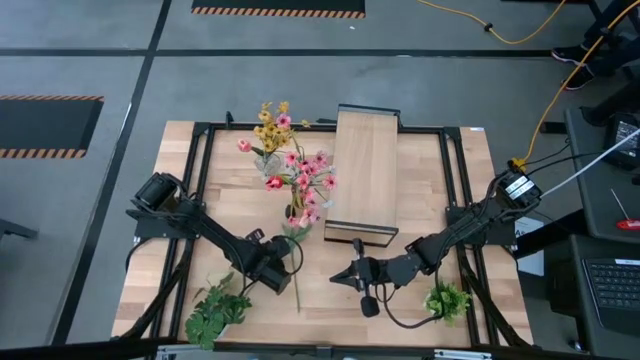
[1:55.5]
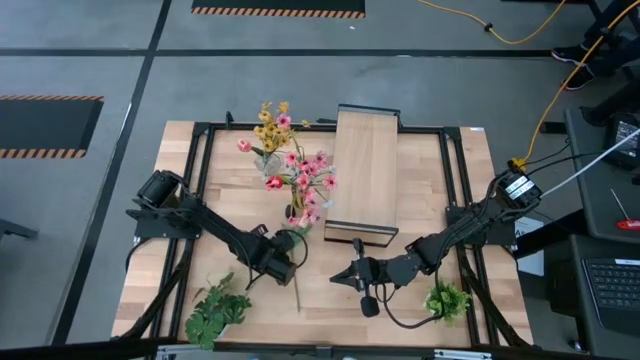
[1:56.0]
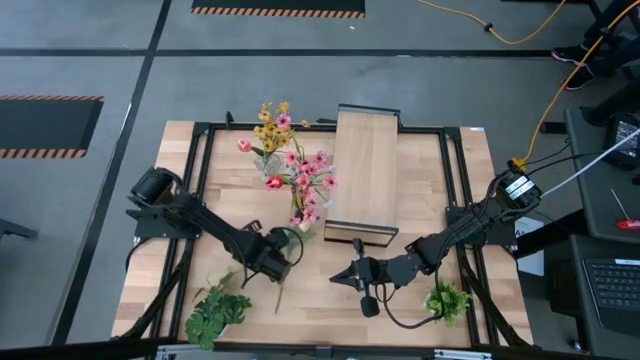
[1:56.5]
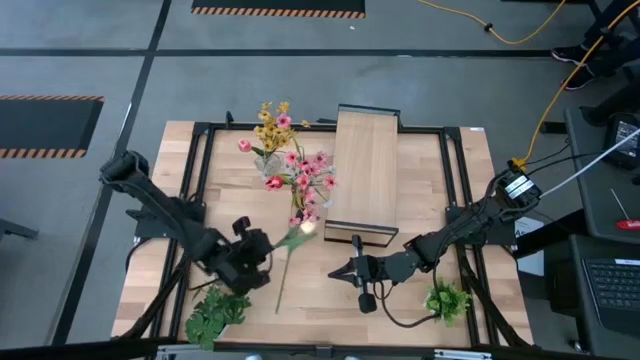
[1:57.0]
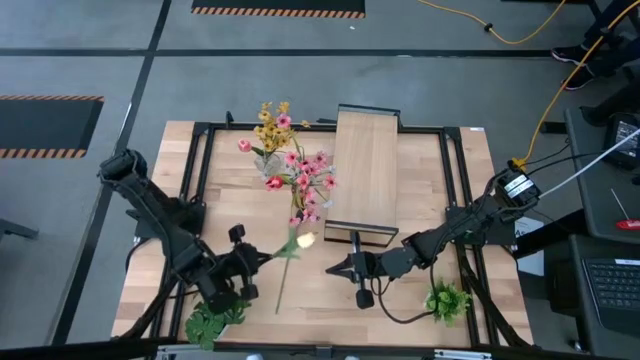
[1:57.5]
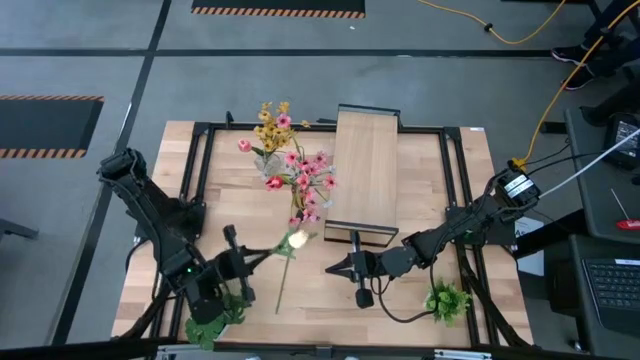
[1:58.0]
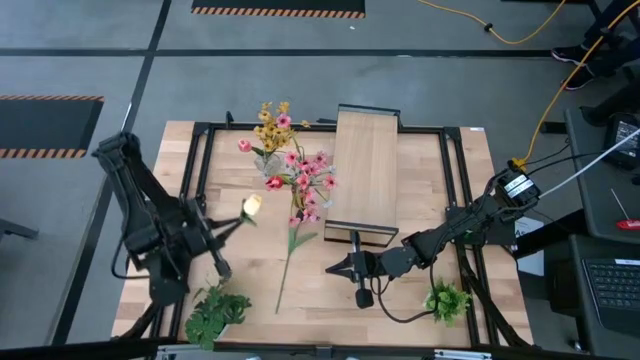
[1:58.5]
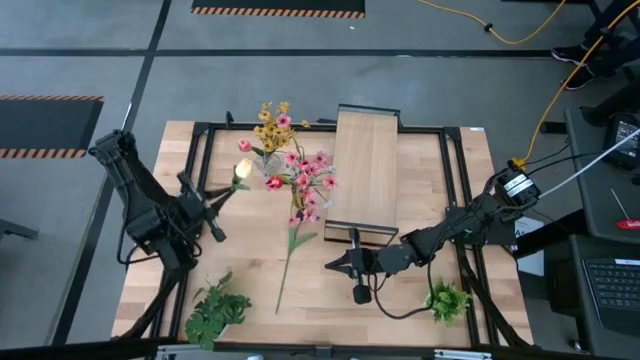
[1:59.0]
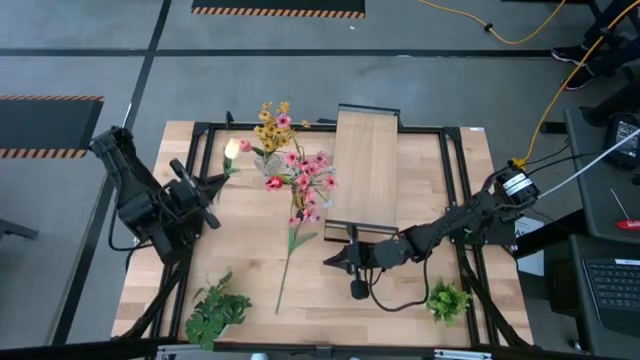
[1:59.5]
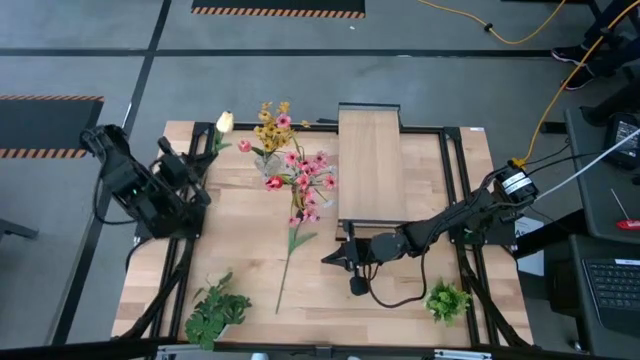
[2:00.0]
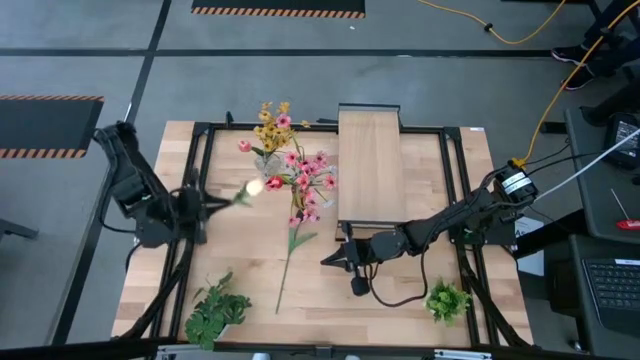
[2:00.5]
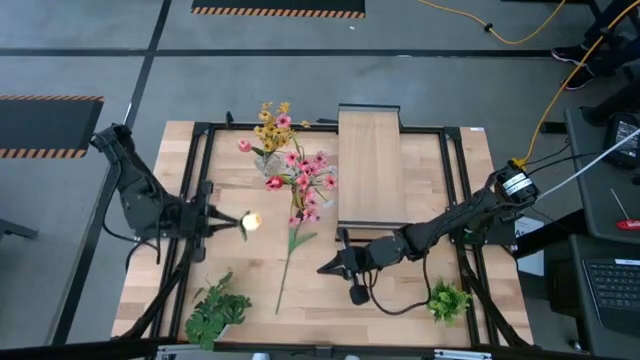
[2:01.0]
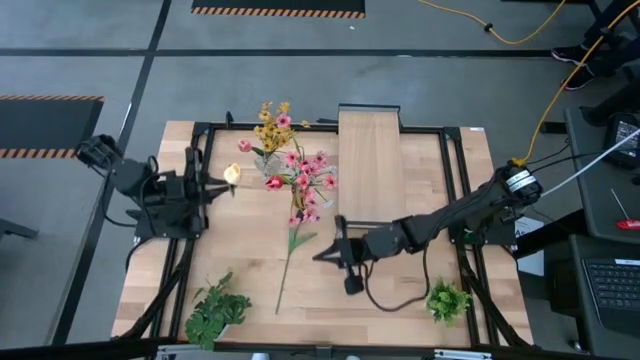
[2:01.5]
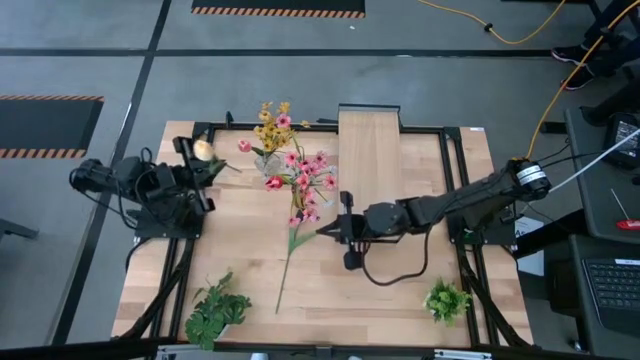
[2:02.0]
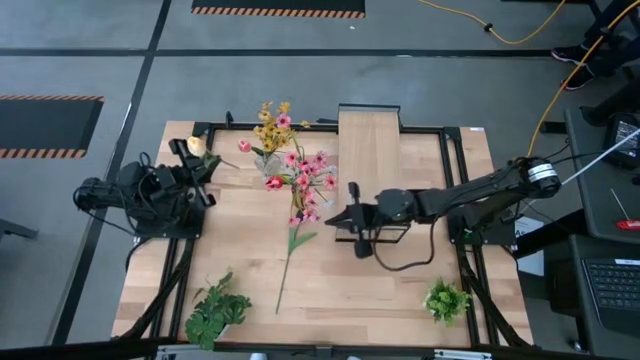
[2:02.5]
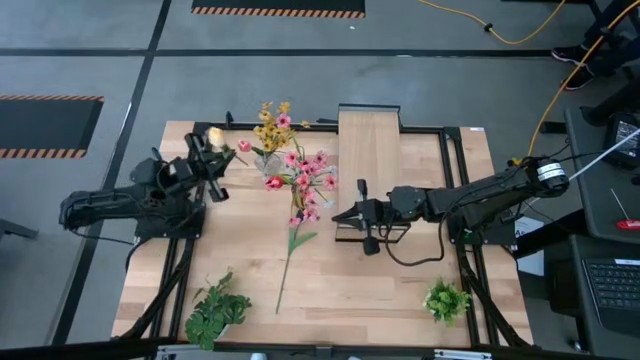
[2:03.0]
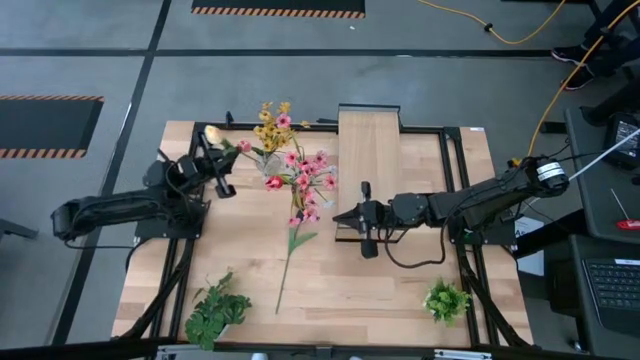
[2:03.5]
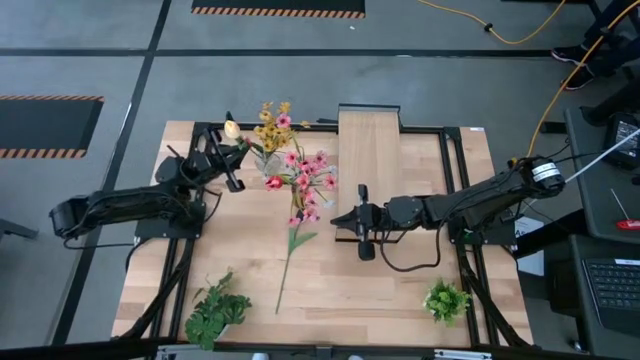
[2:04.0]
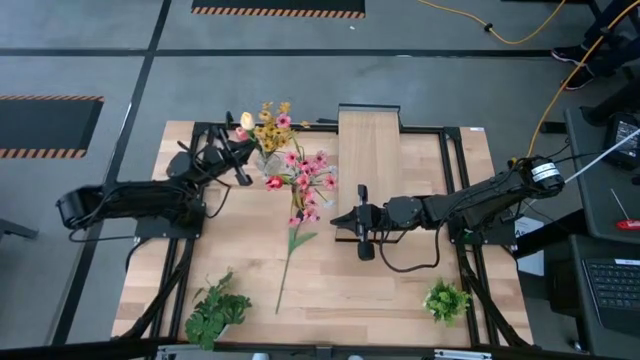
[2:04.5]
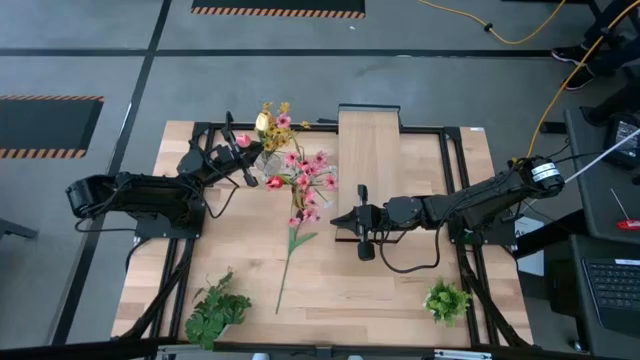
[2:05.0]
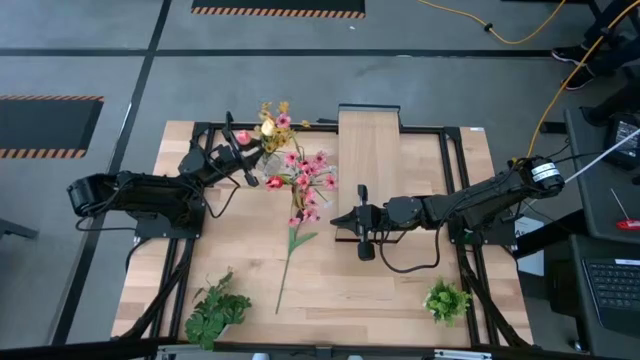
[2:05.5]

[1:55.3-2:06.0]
Task: Pick and place flowers into a vace then onto a shelf
Put the light yellow tulip into the transparent vase

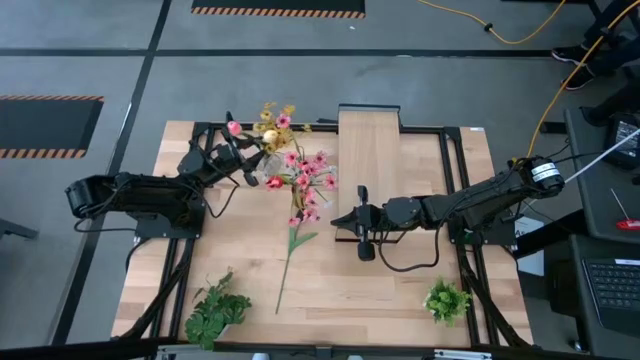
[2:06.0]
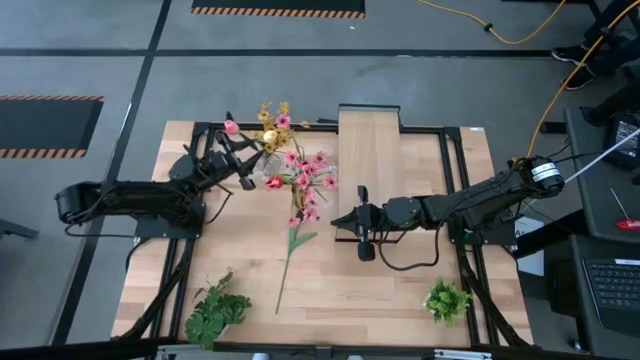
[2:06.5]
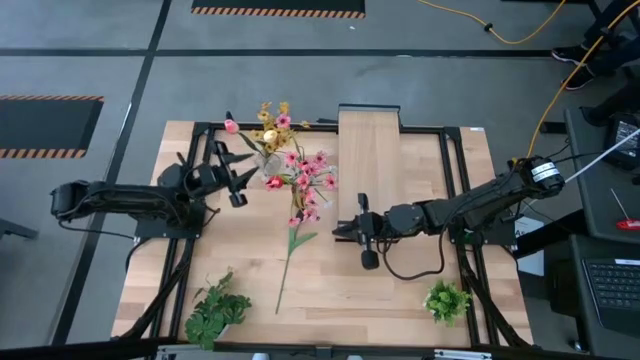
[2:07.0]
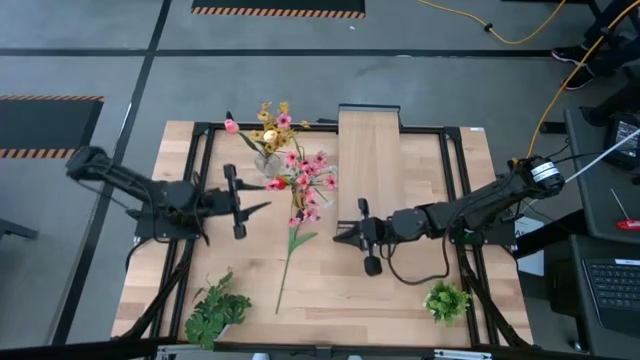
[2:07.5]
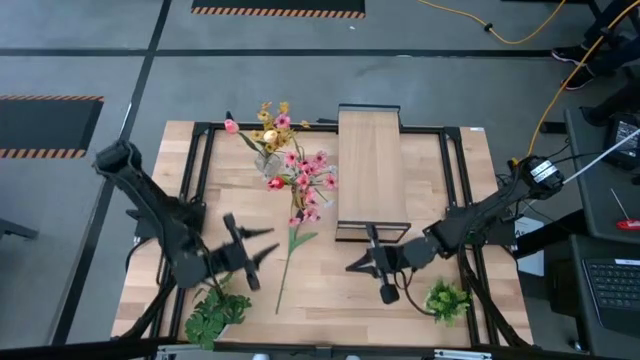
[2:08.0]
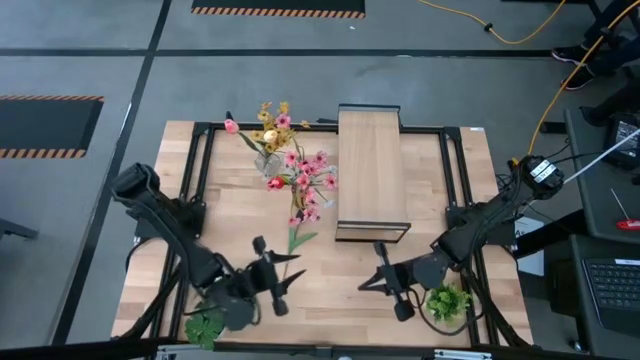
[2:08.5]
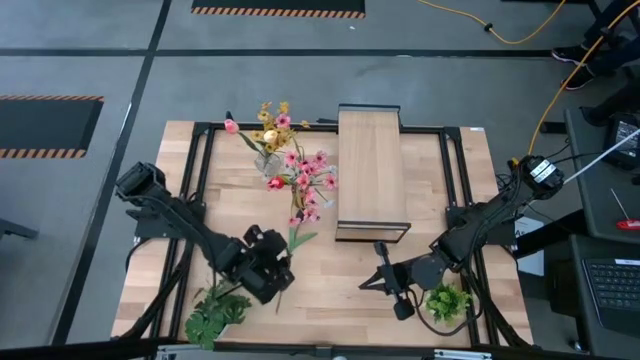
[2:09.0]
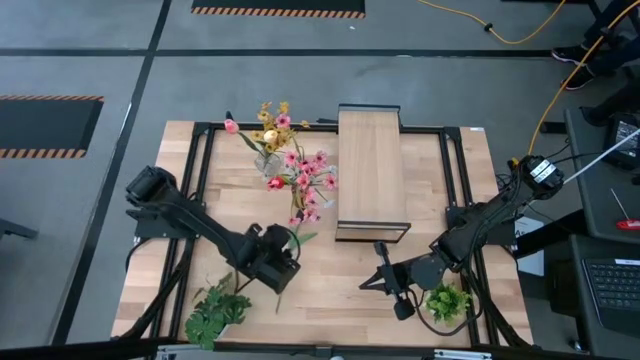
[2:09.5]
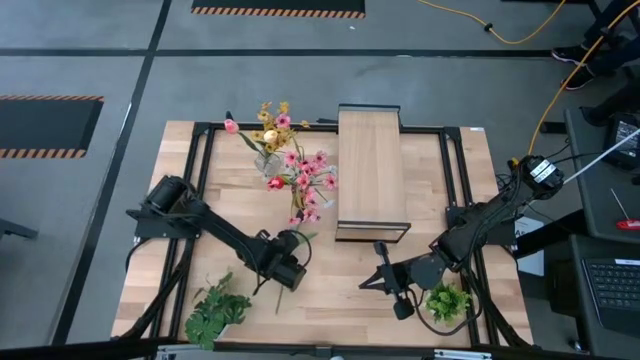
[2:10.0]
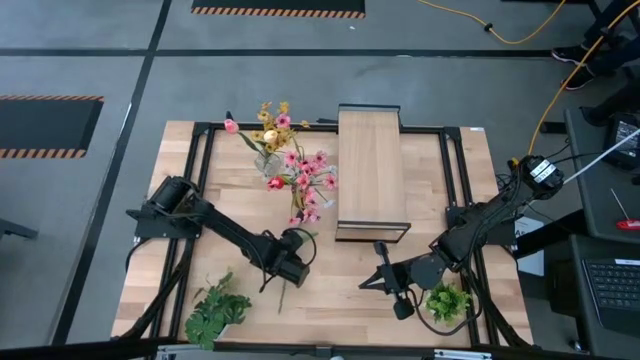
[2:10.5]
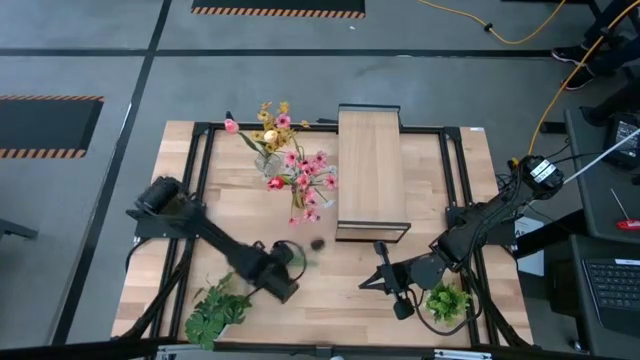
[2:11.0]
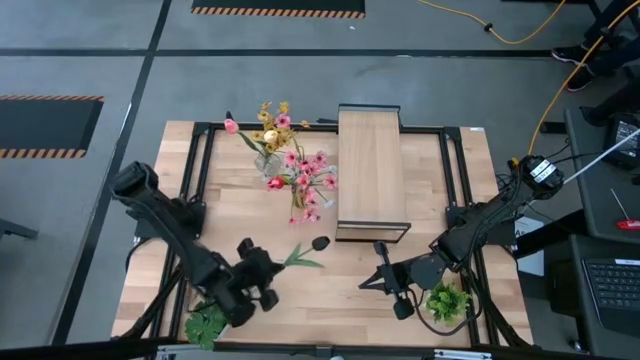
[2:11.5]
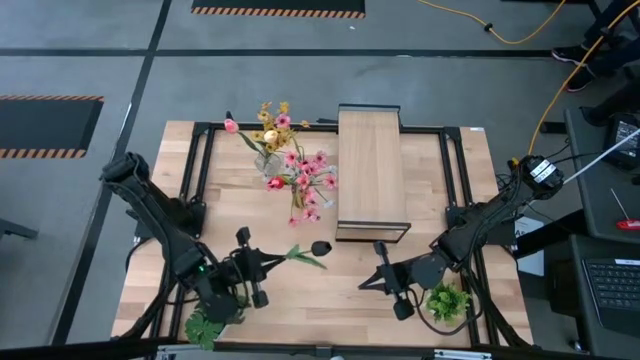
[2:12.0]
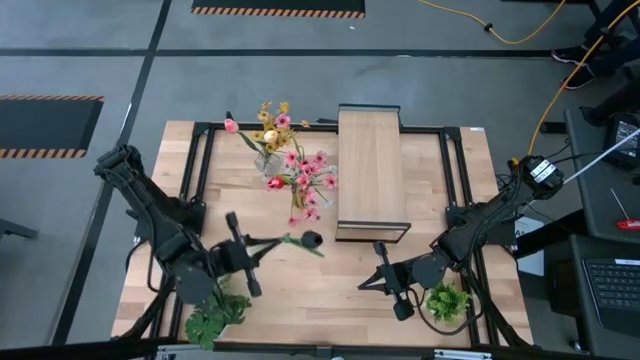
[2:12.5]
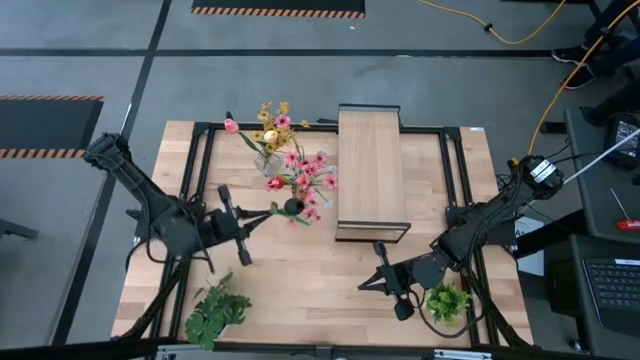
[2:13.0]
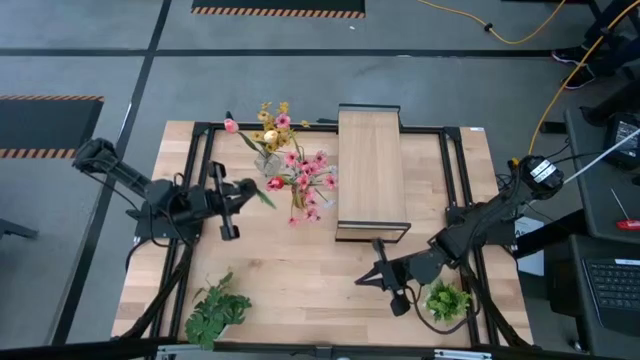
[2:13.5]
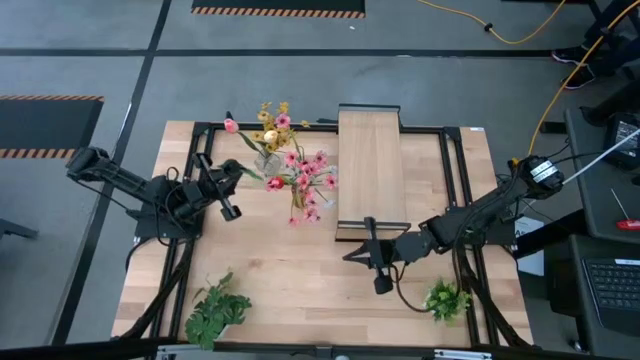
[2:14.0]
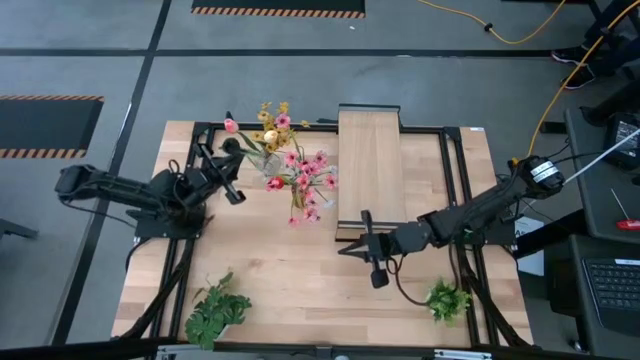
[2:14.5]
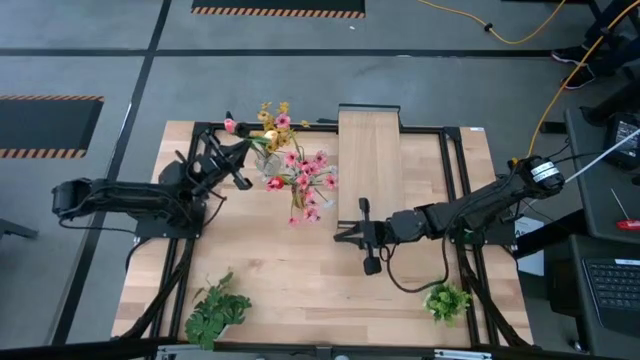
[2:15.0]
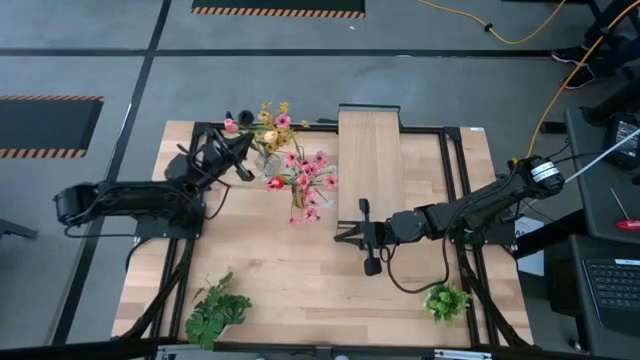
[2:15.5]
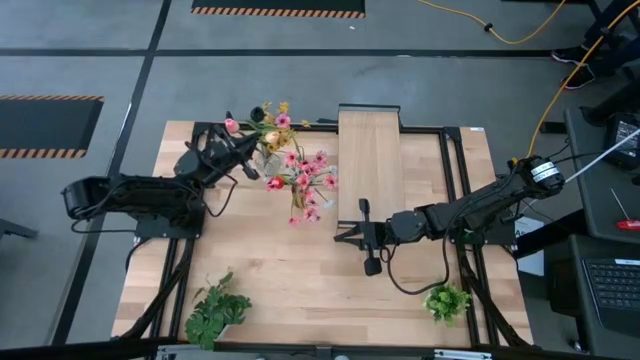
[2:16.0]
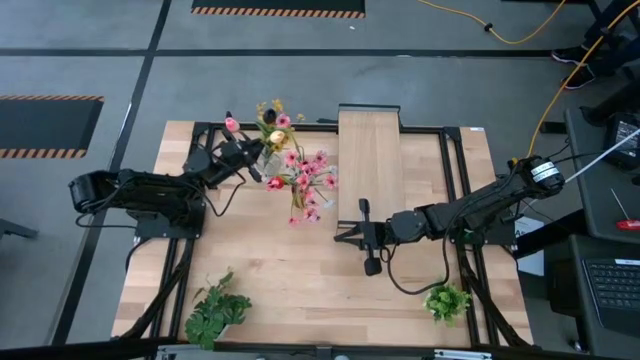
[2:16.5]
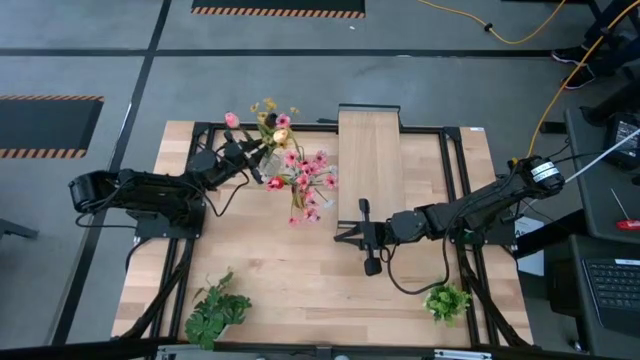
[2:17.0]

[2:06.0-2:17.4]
Put the black tulip into the transparent vase
